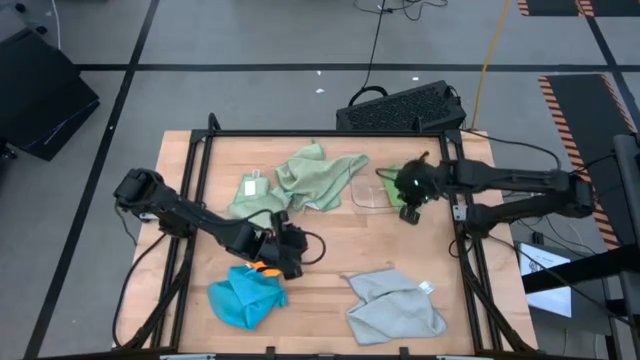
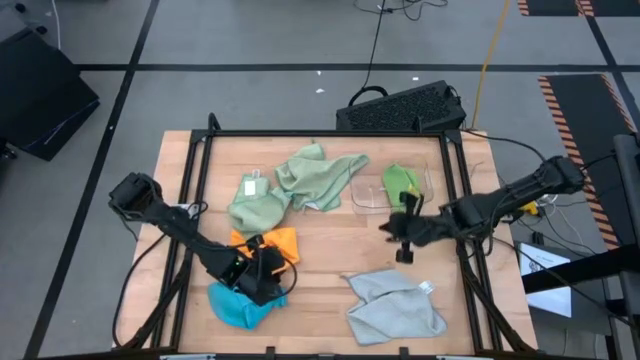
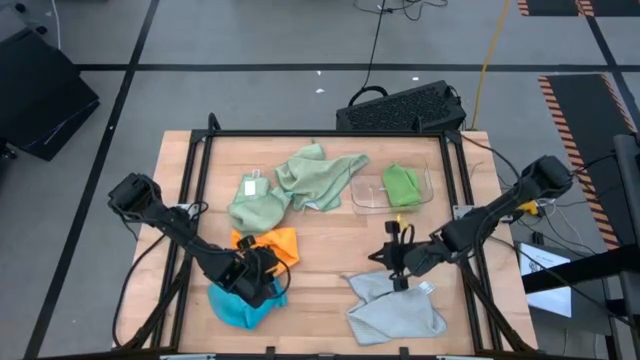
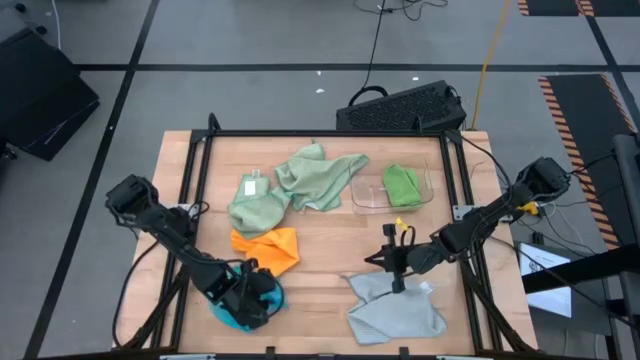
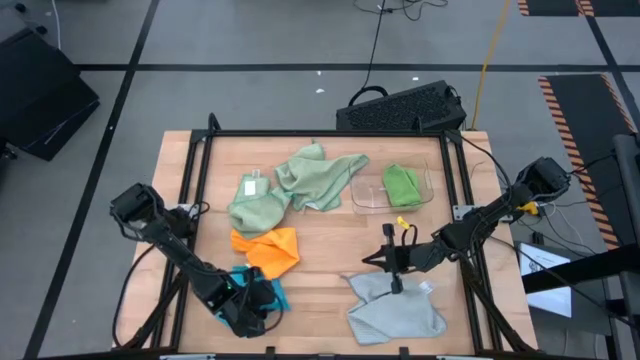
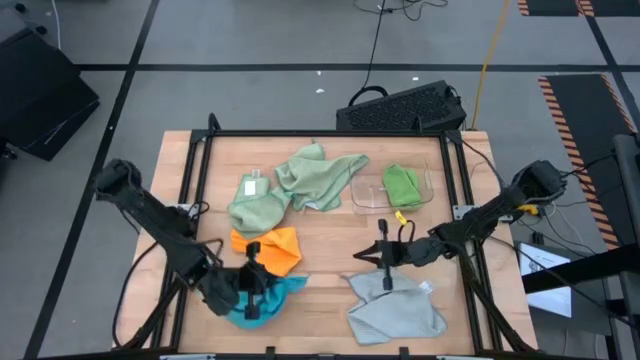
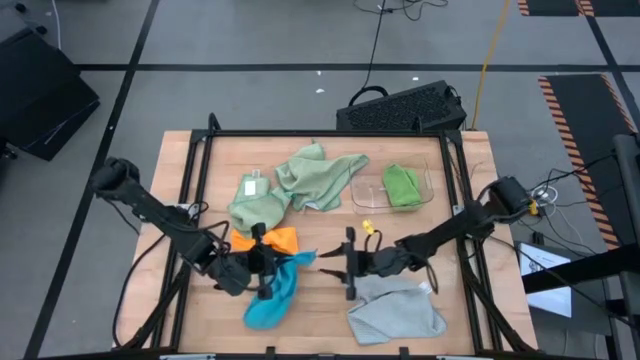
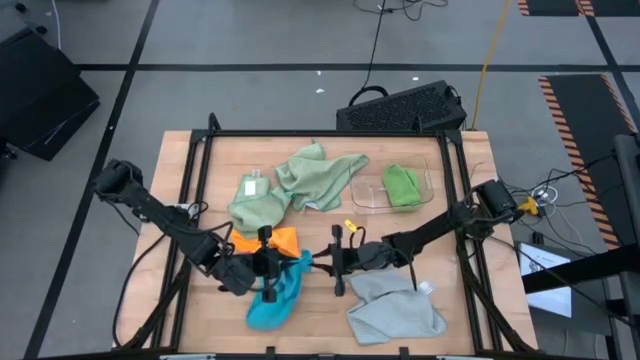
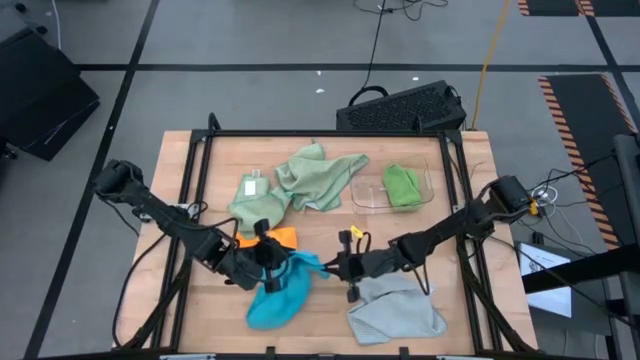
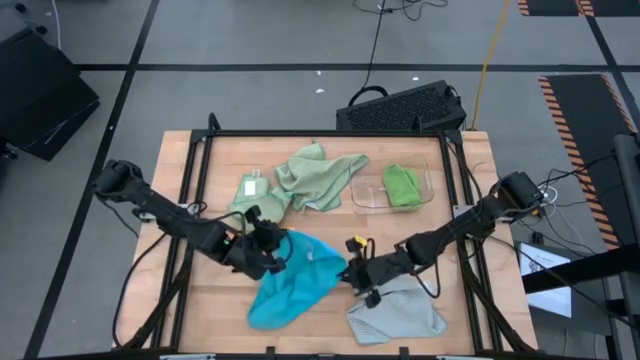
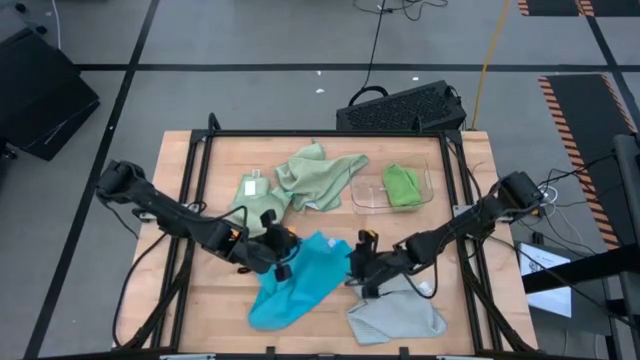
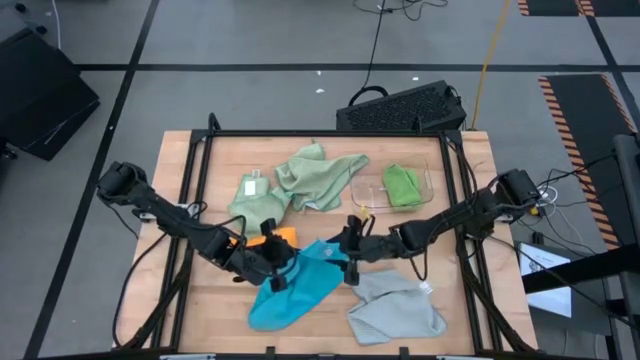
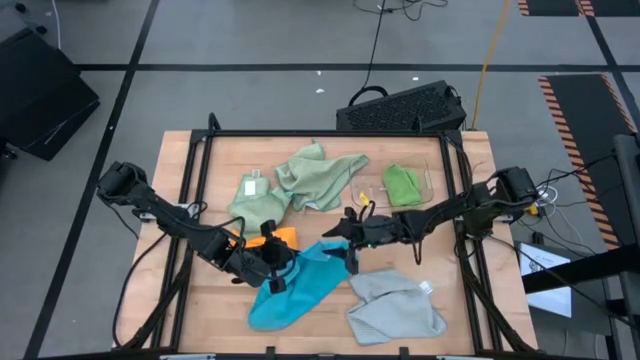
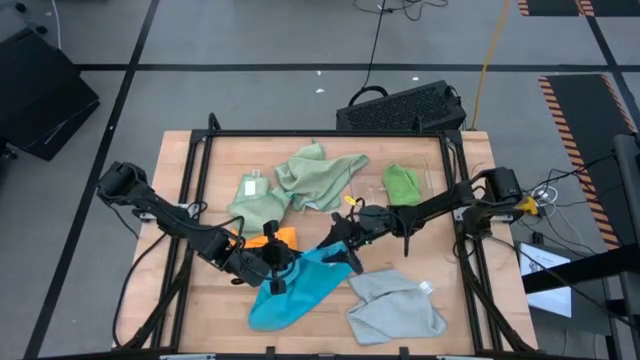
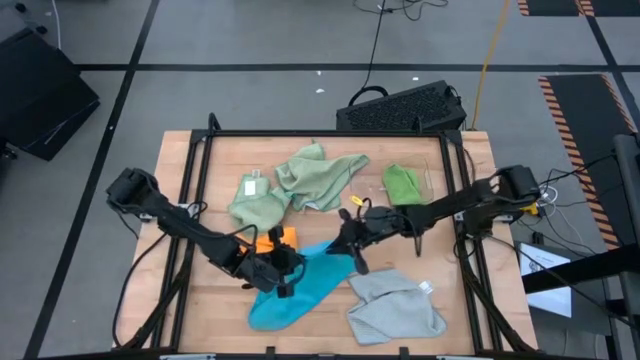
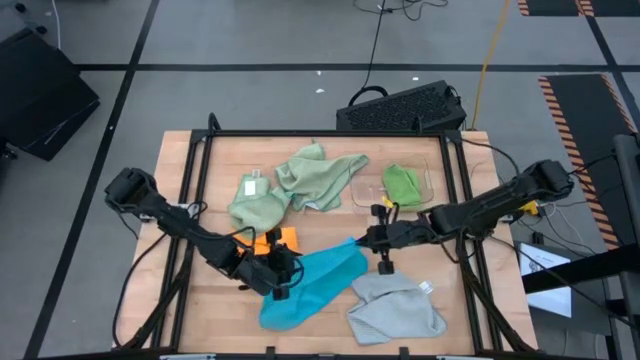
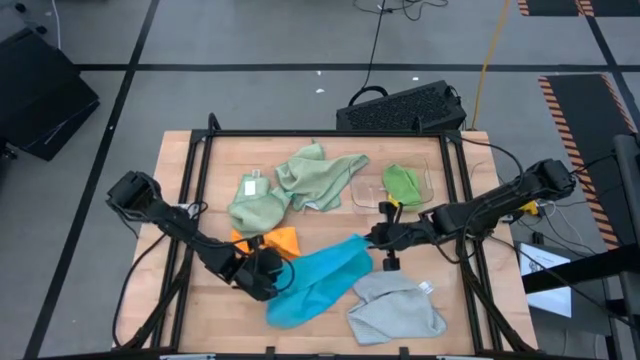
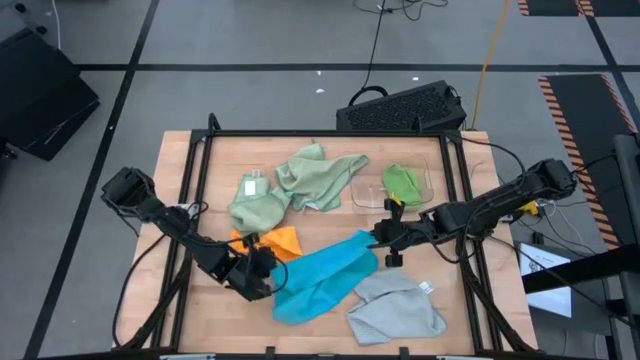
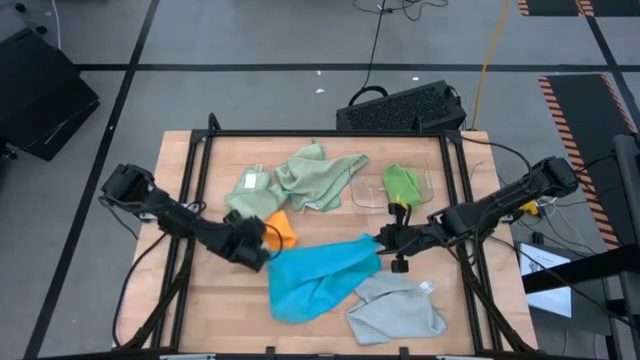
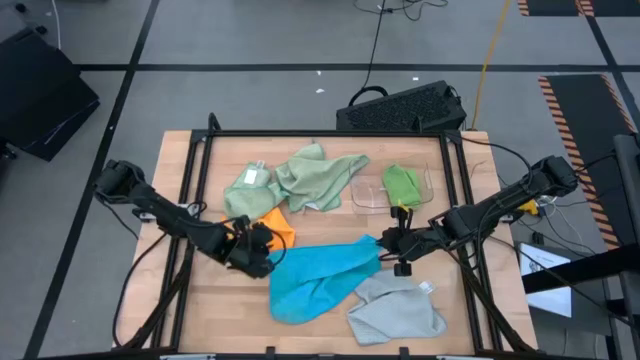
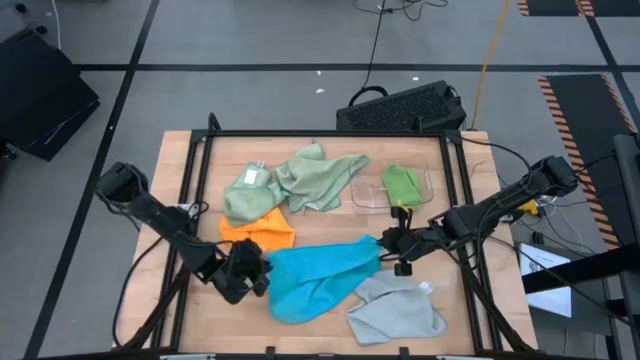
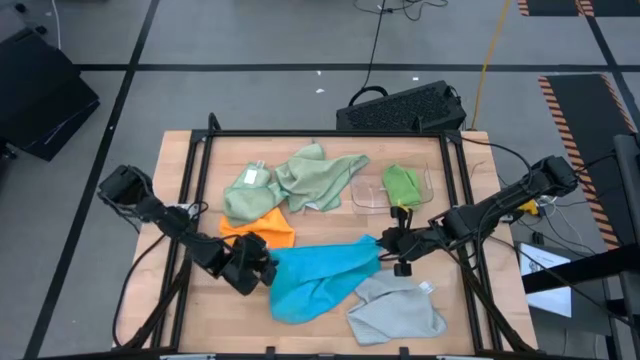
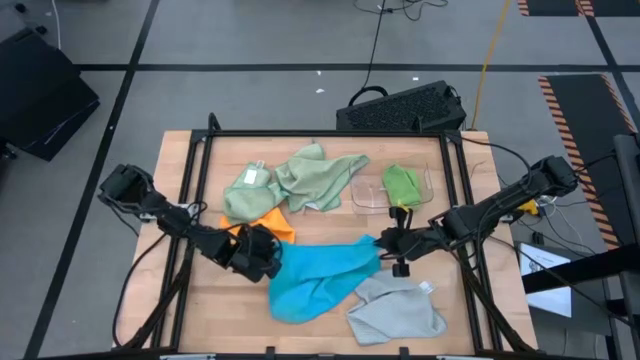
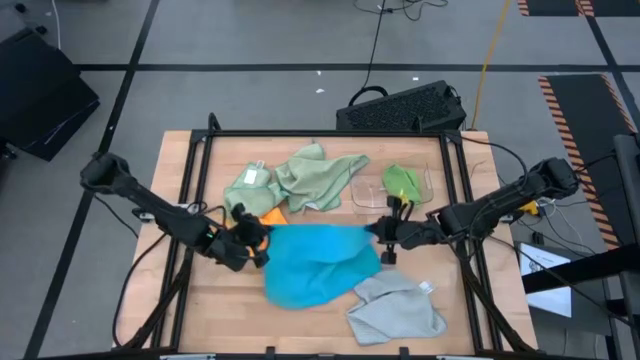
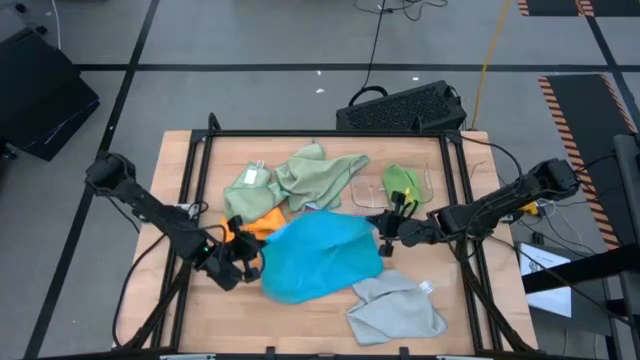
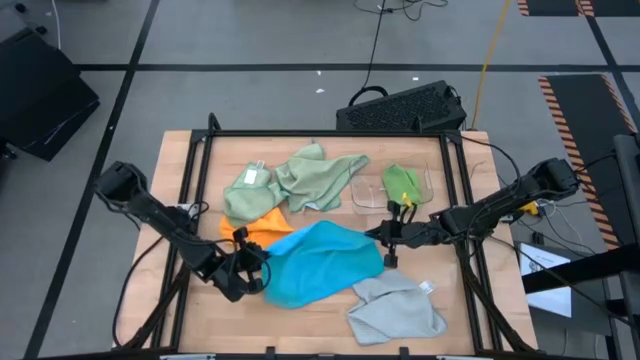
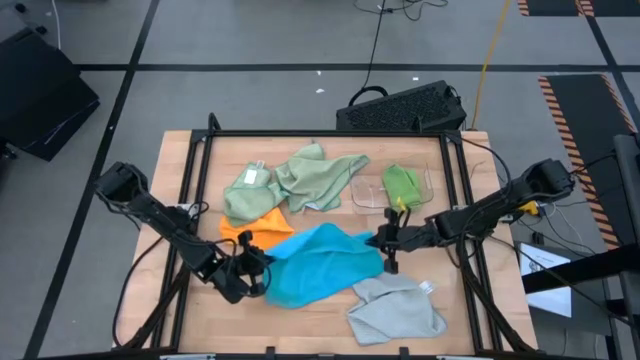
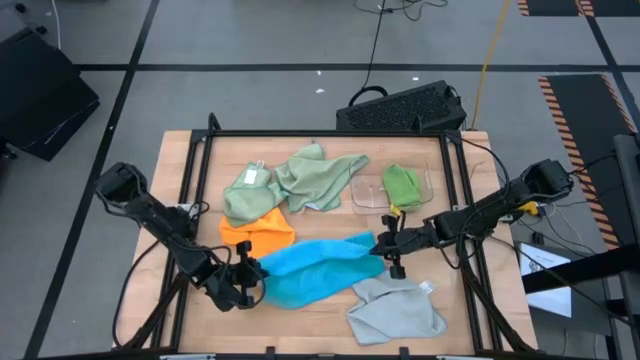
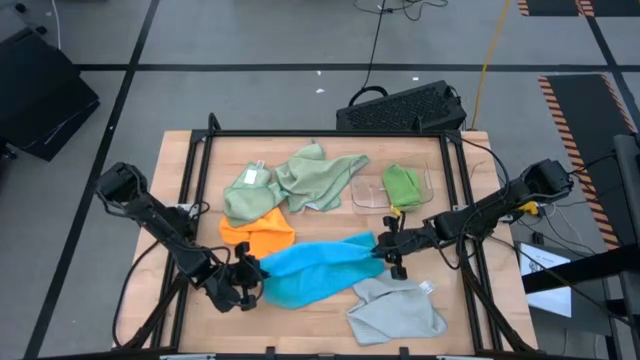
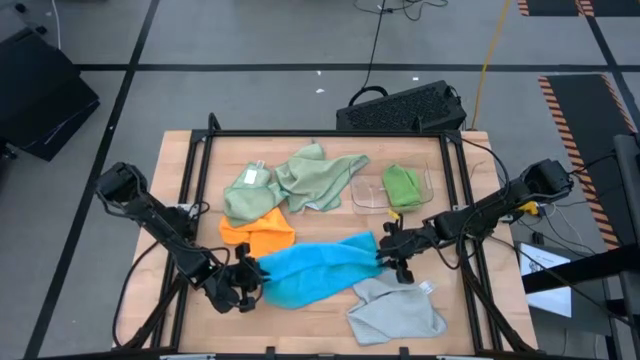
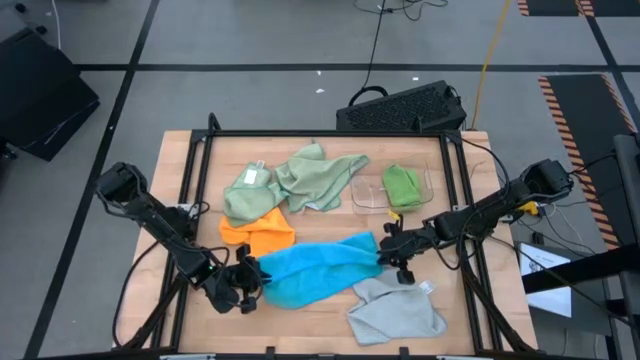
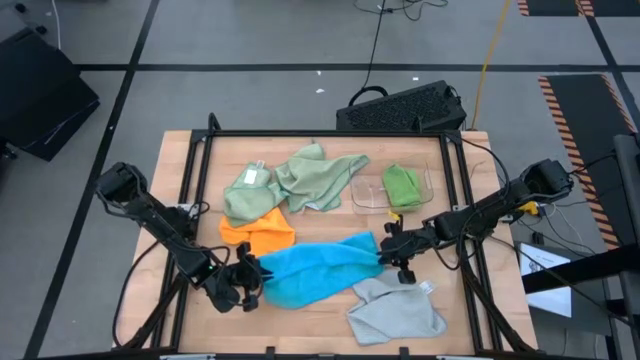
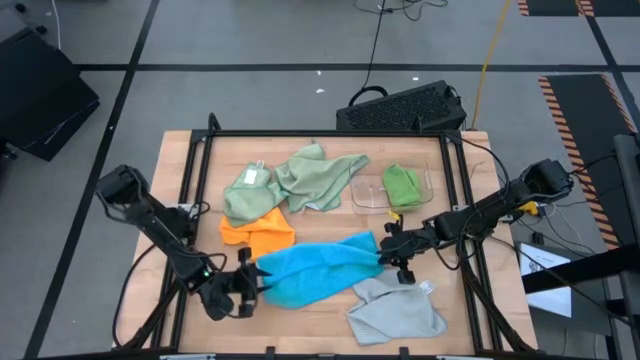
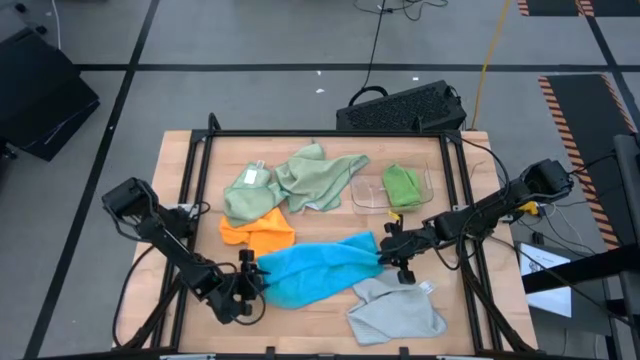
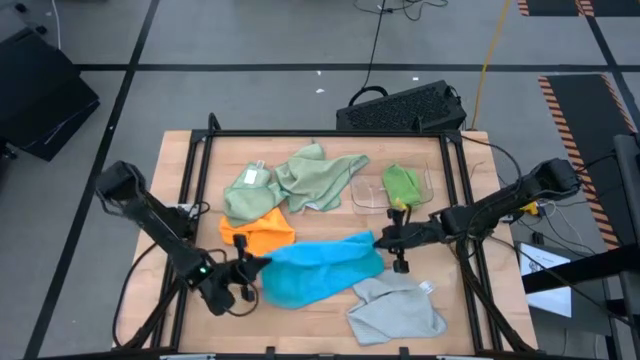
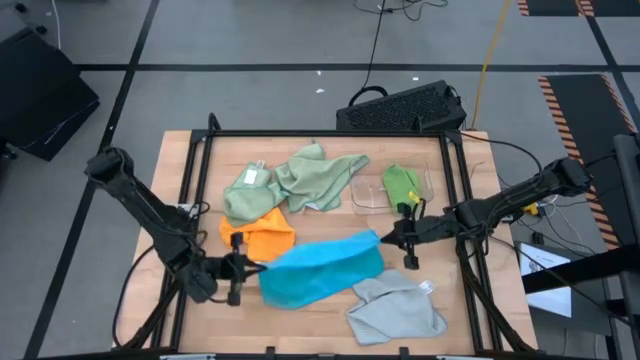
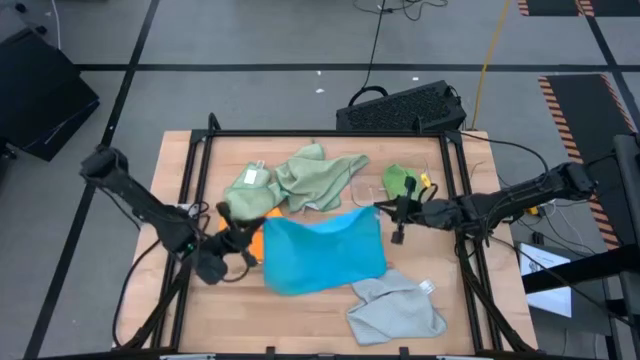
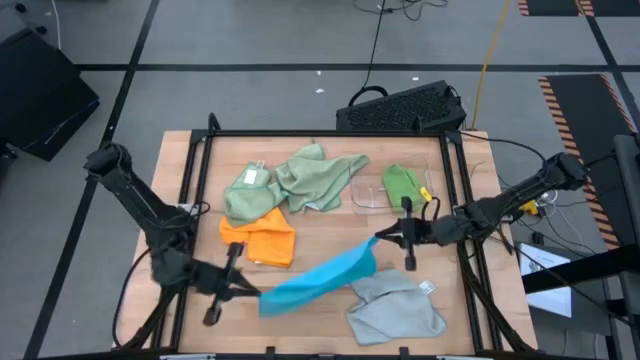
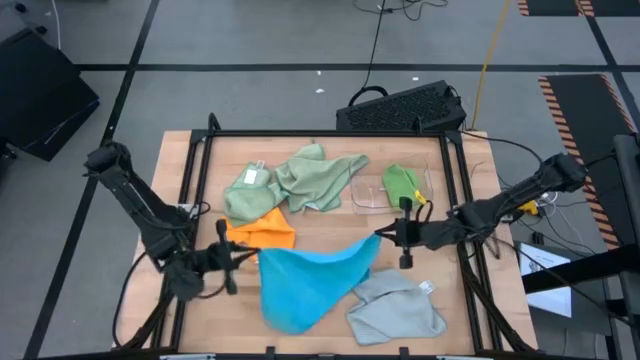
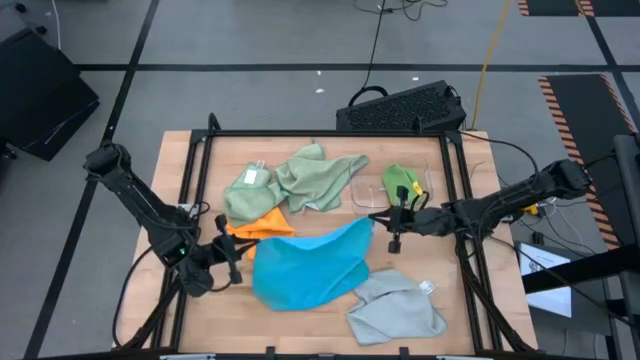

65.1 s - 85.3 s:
Task: Fold microfiber towels
Fold the blue microfiber cloth

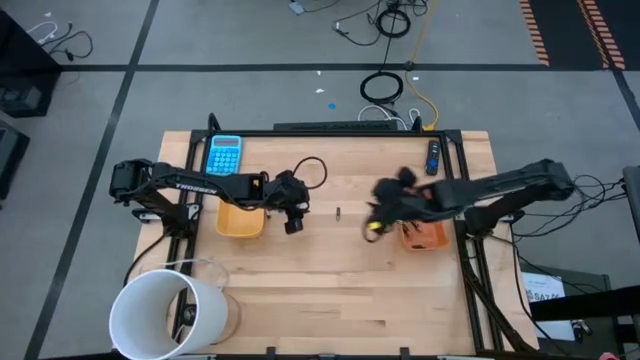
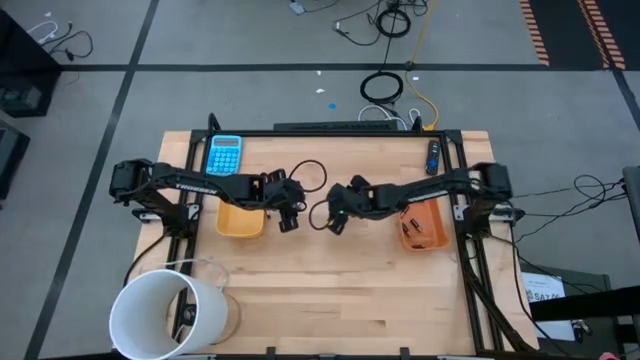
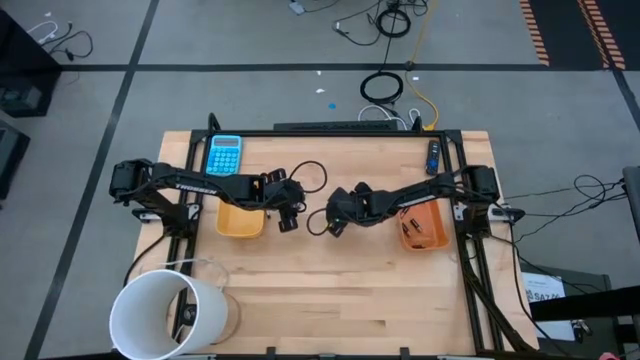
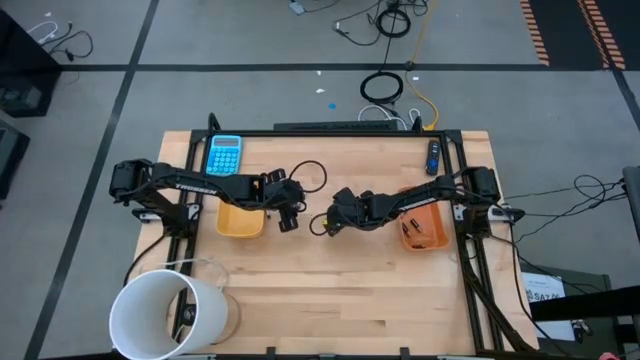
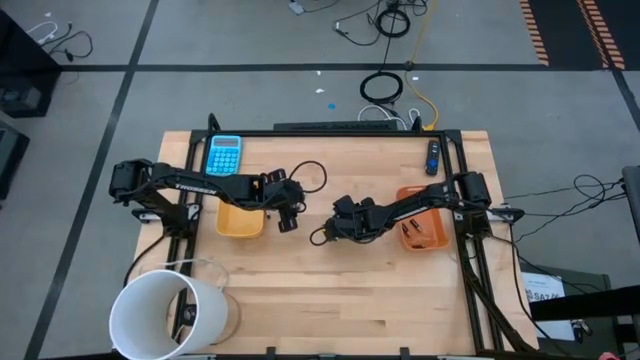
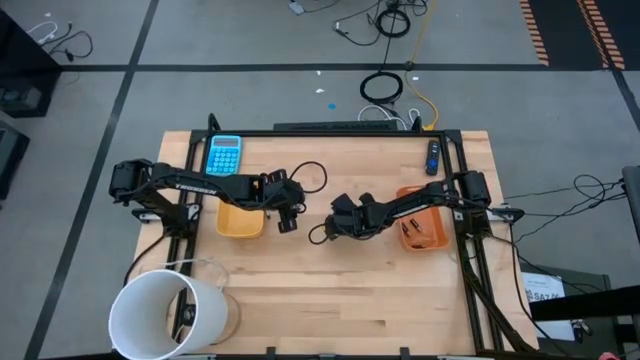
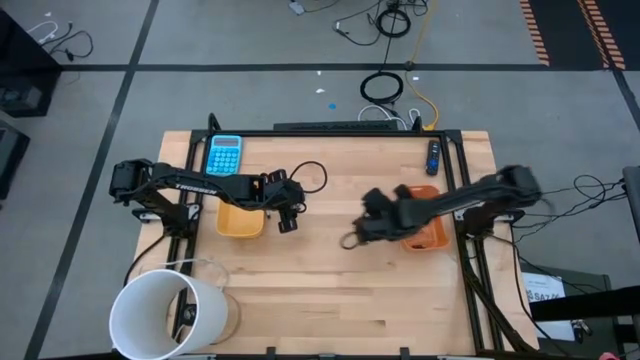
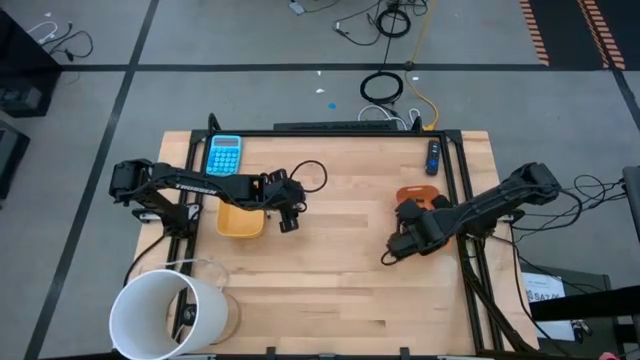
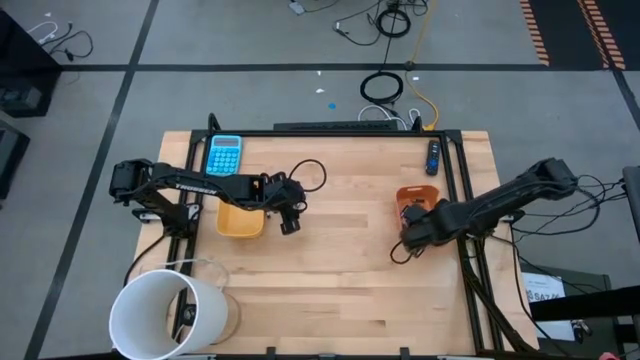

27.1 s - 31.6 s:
Task: Sort batteries
Put the black battery into the orange bin
